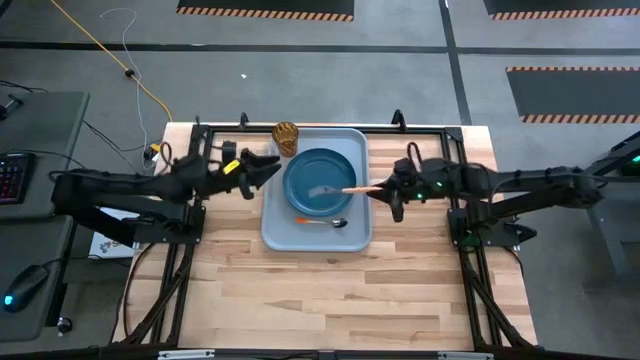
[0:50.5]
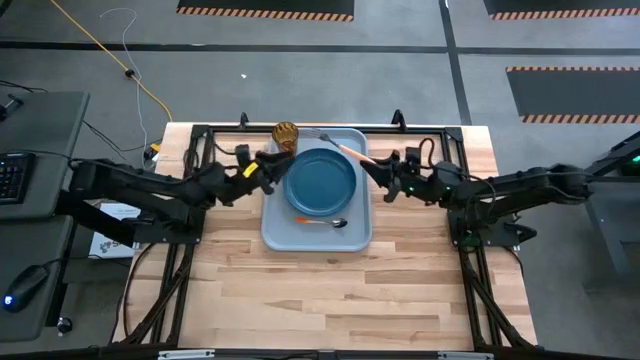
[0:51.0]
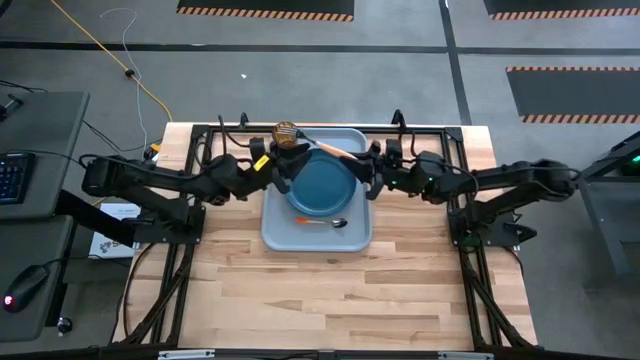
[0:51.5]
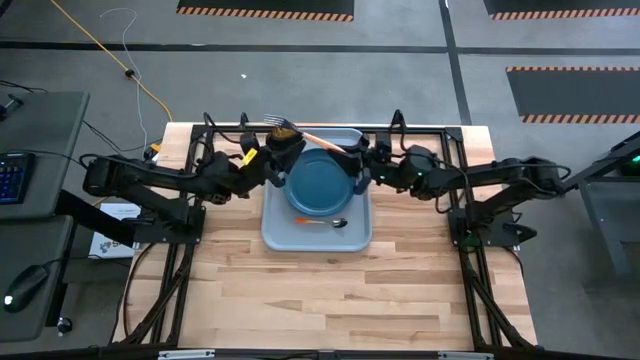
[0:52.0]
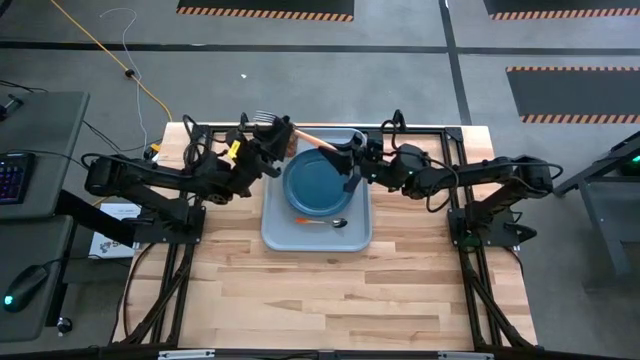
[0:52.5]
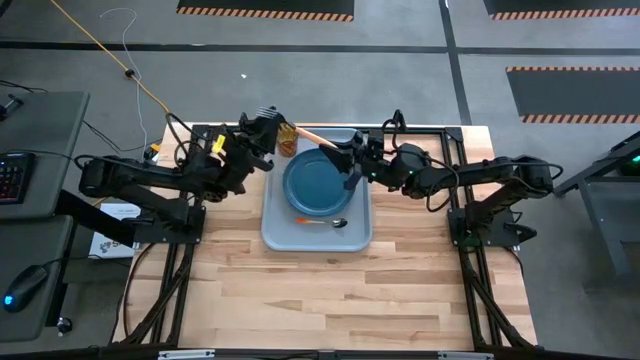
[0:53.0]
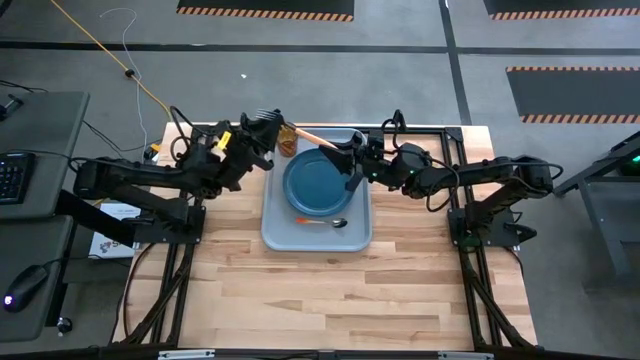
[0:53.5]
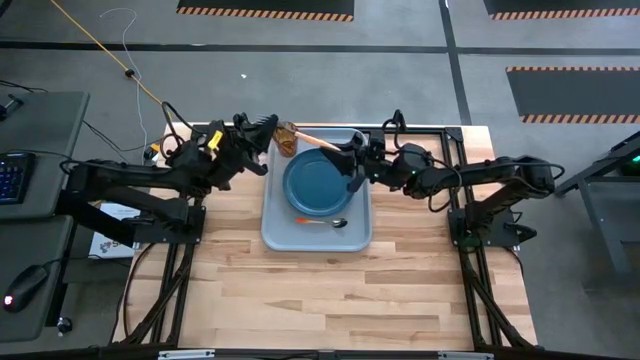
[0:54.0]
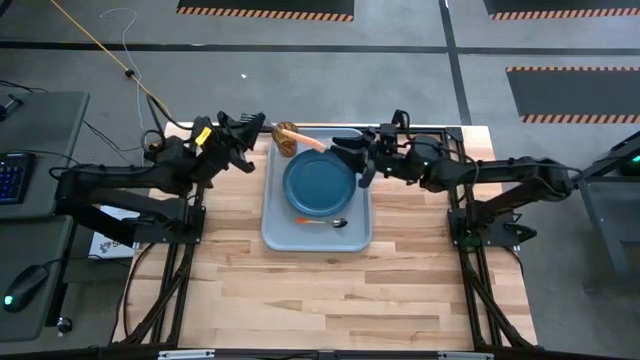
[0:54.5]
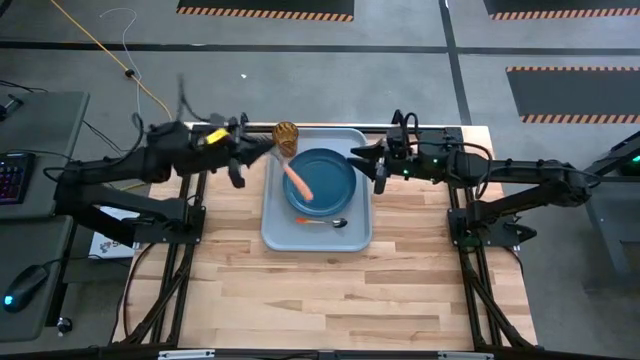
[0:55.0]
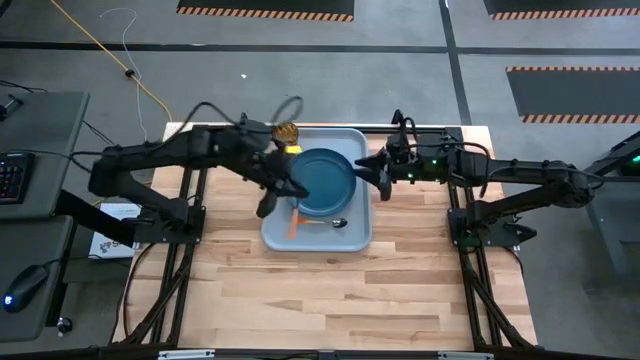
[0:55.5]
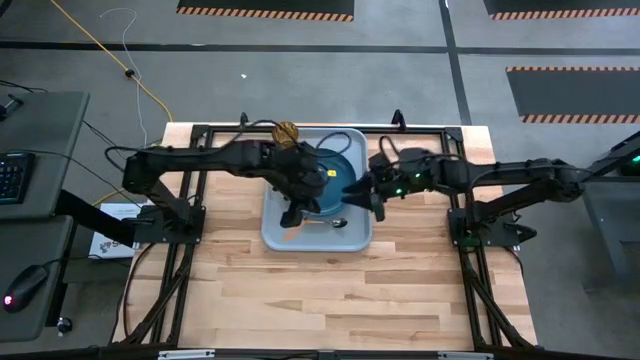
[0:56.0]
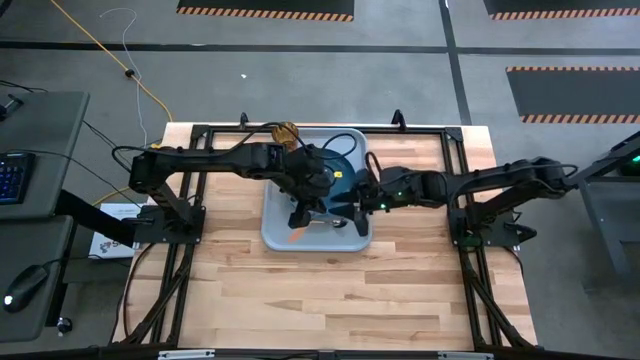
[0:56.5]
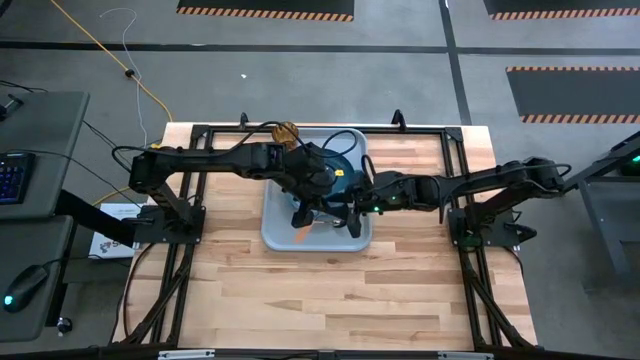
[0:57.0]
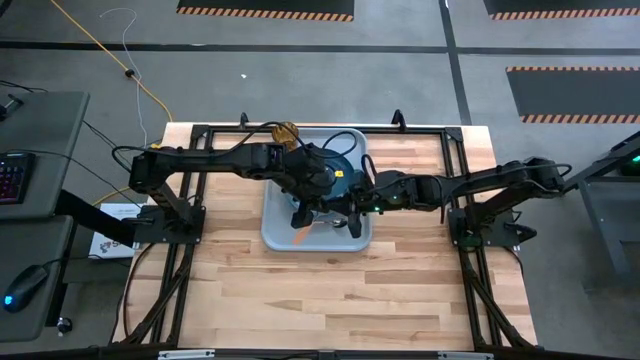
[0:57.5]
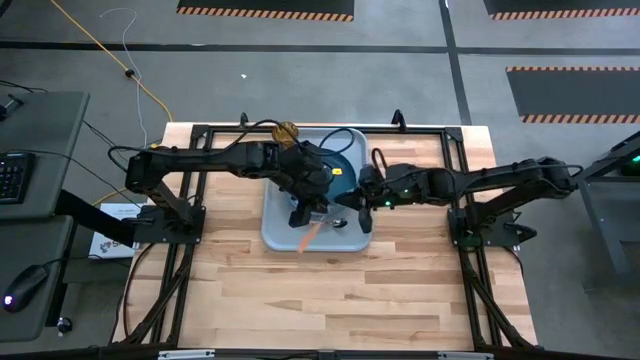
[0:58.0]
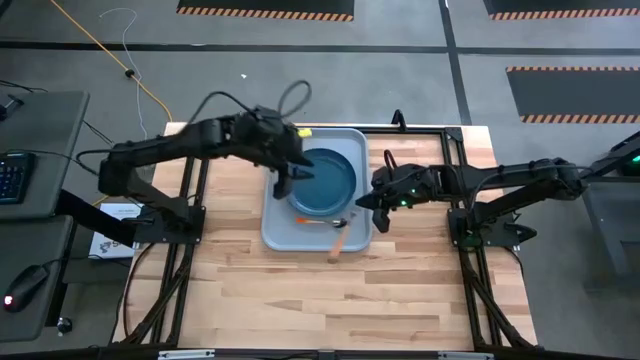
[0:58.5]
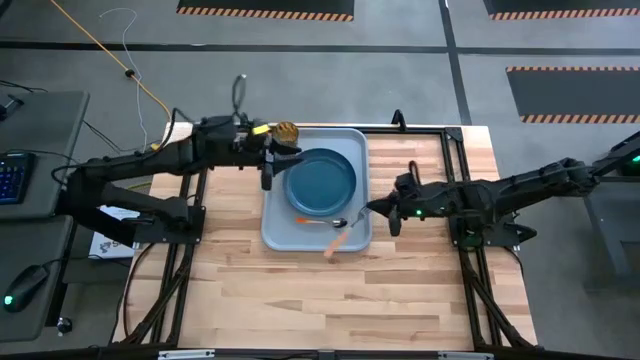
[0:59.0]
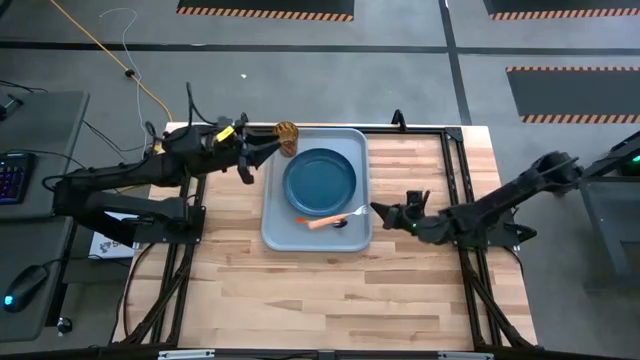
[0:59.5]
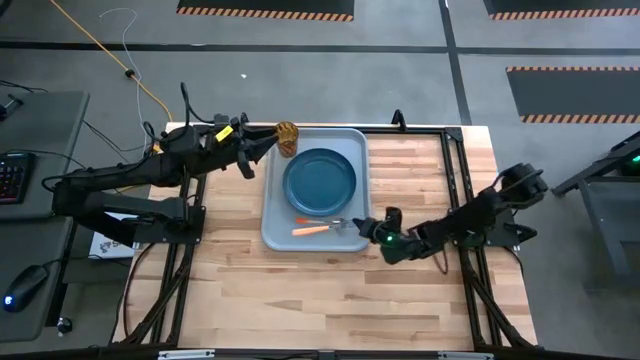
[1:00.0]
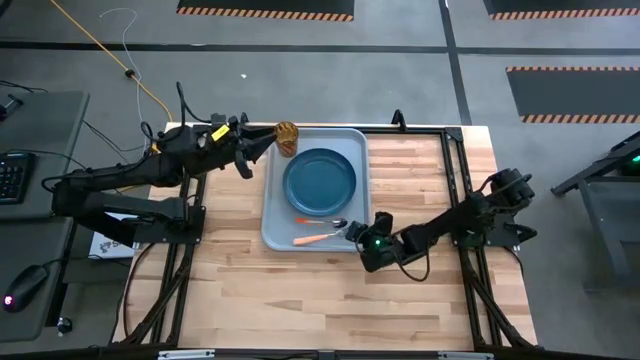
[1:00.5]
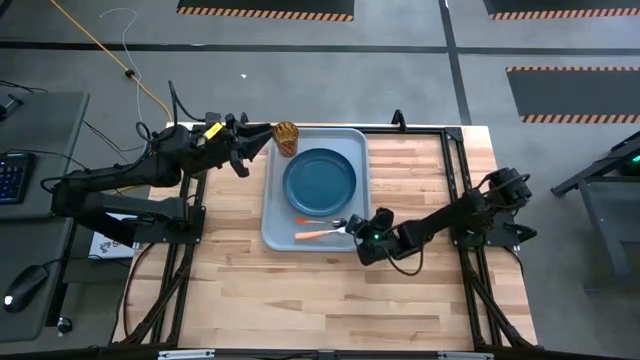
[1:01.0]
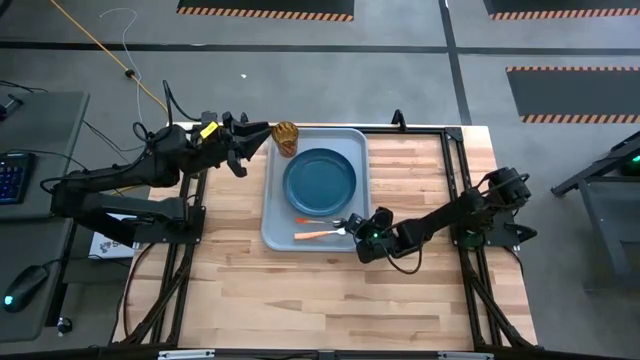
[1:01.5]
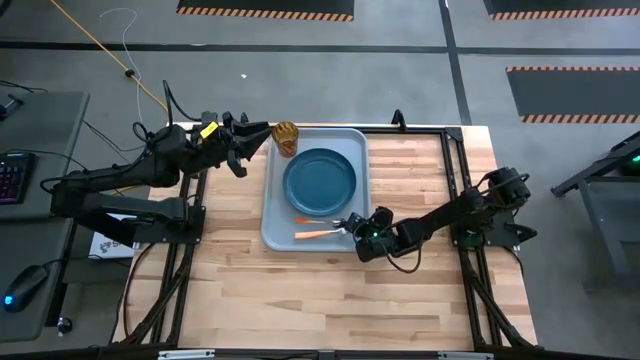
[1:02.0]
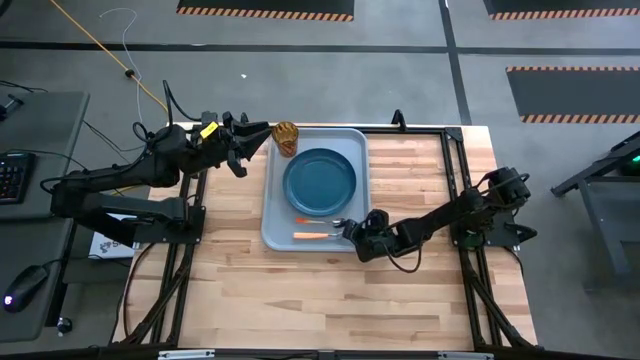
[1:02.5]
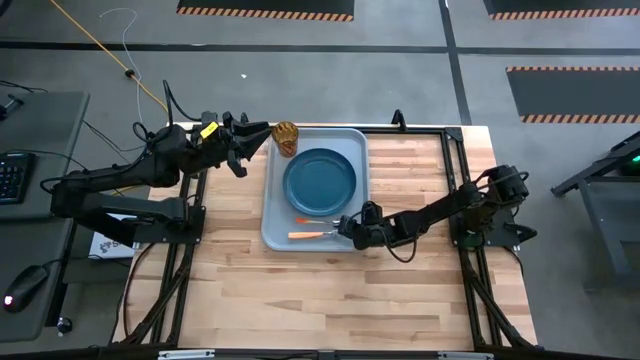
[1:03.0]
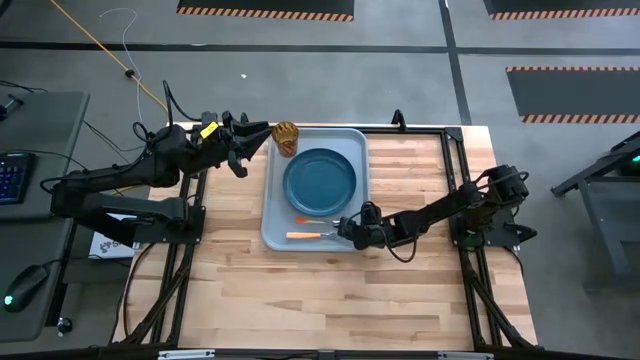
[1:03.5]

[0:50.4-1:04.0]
Task: Pick and place plate/cup/fork/spoon on tray
Put the orange fork on the bottom side of the light blue tray next to the orange spoon

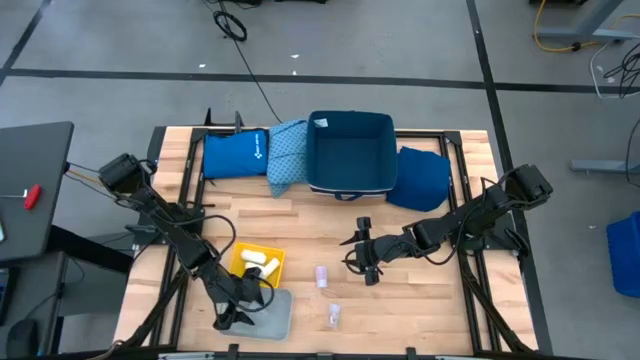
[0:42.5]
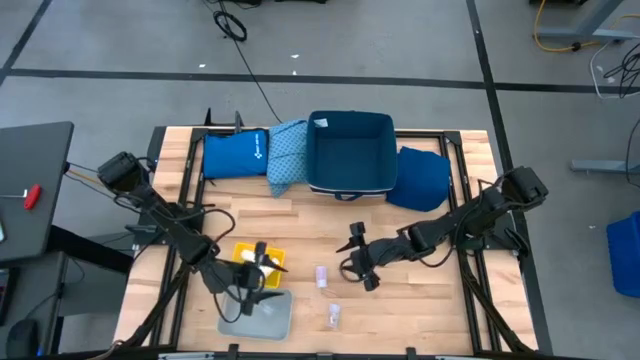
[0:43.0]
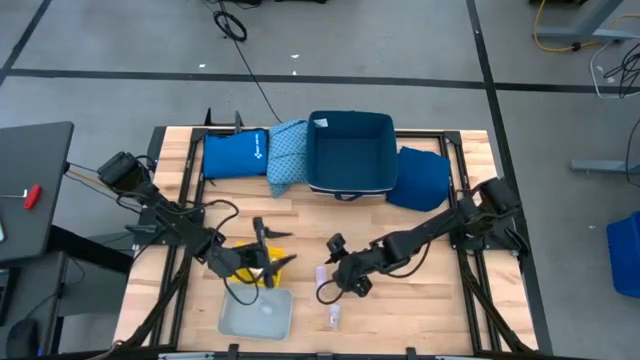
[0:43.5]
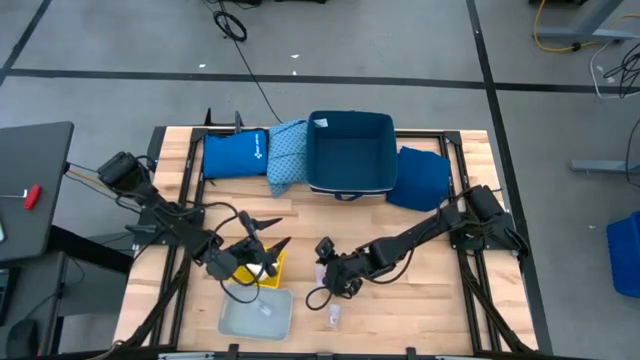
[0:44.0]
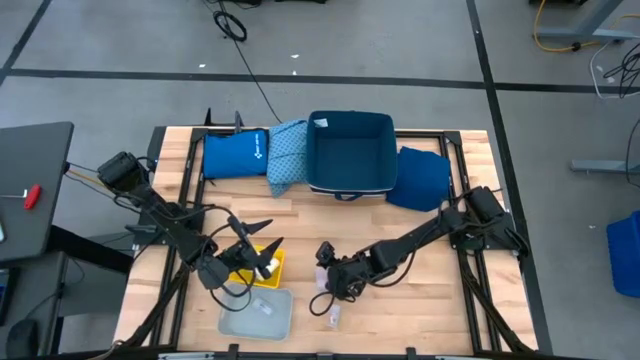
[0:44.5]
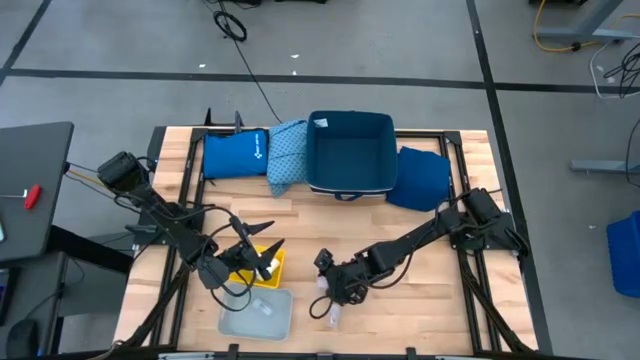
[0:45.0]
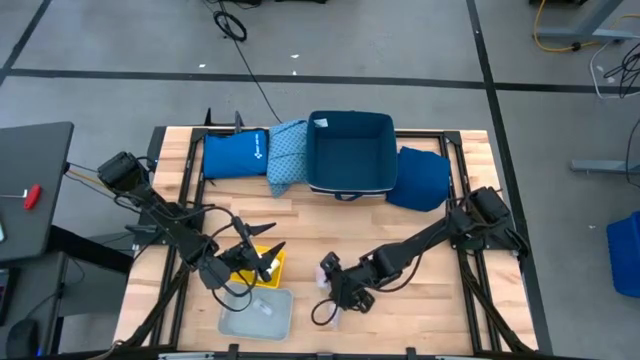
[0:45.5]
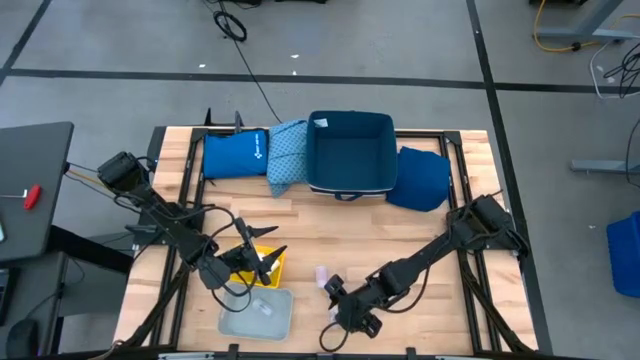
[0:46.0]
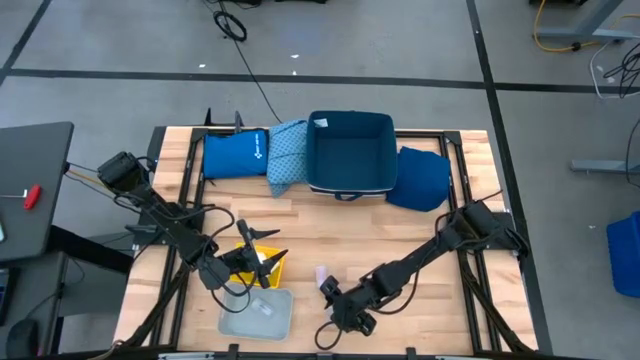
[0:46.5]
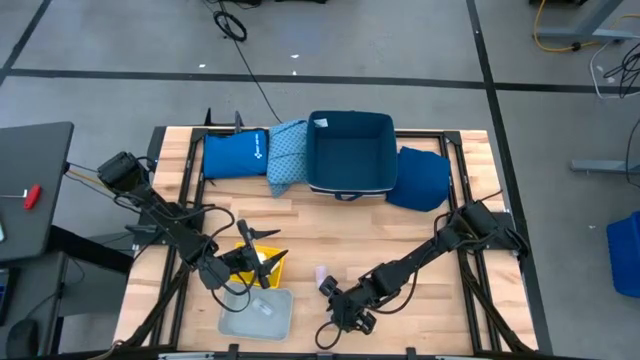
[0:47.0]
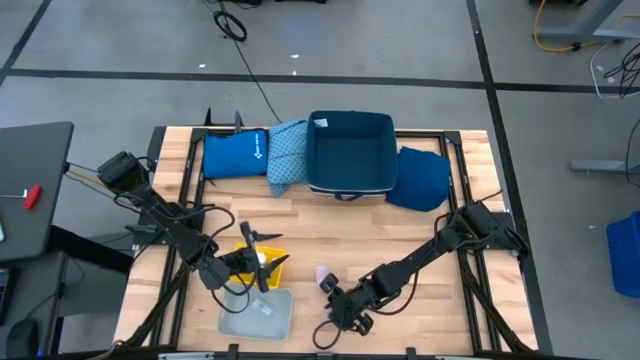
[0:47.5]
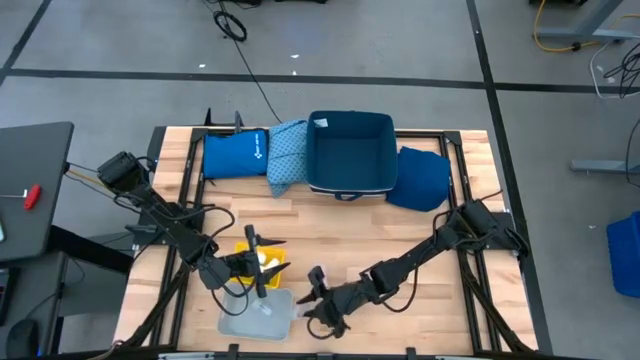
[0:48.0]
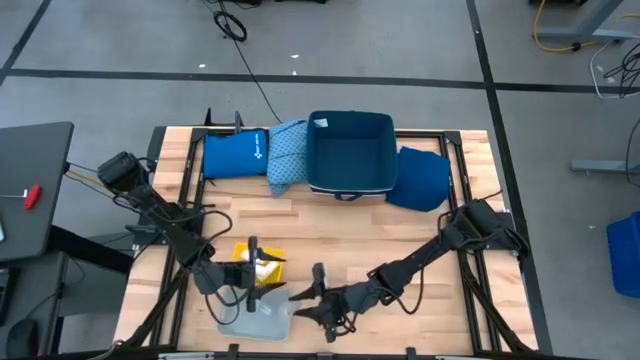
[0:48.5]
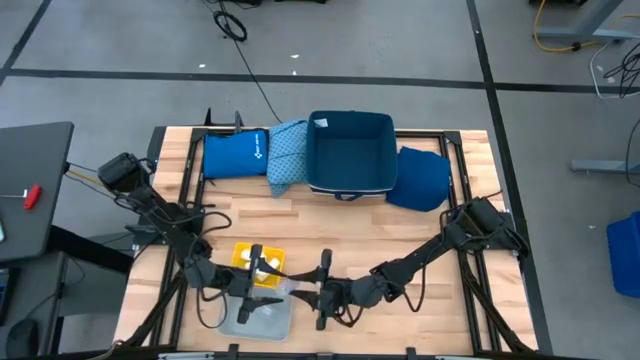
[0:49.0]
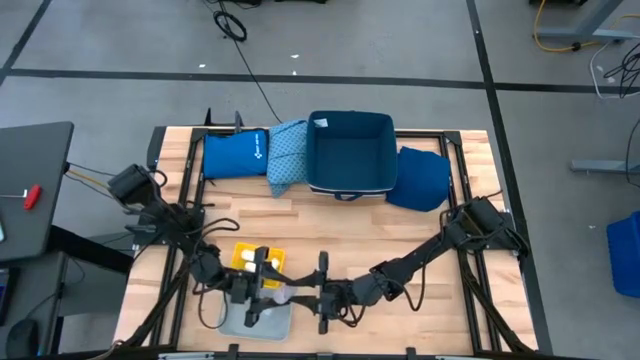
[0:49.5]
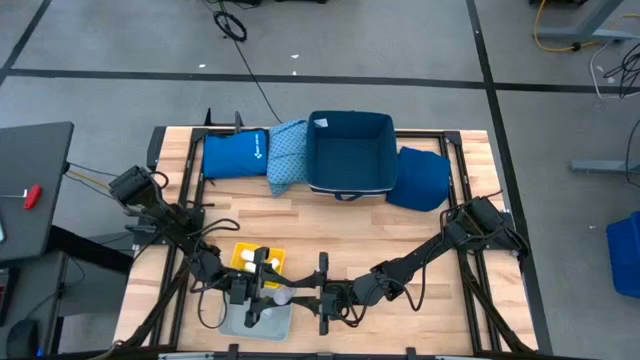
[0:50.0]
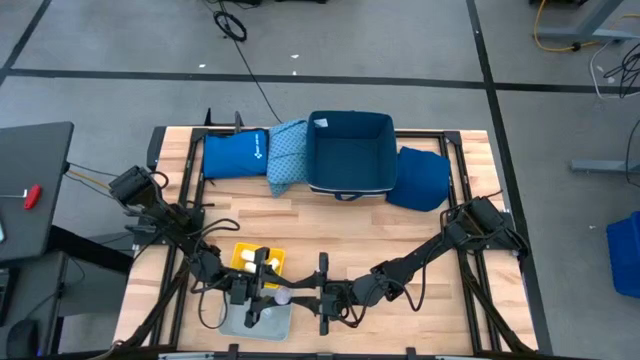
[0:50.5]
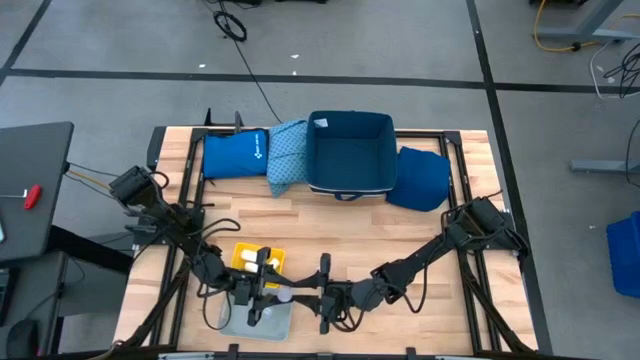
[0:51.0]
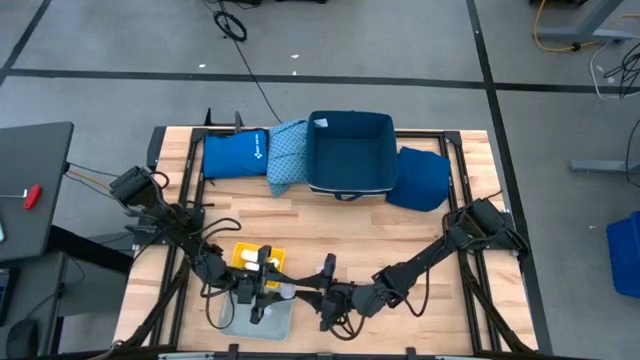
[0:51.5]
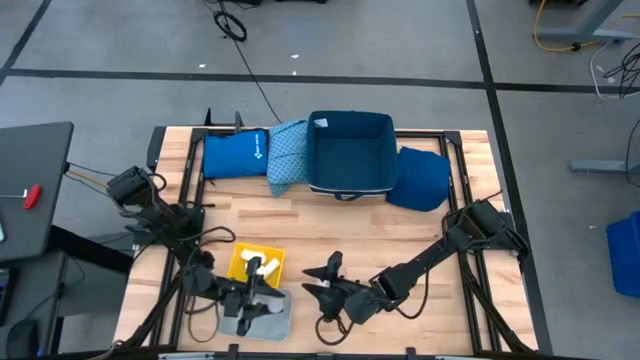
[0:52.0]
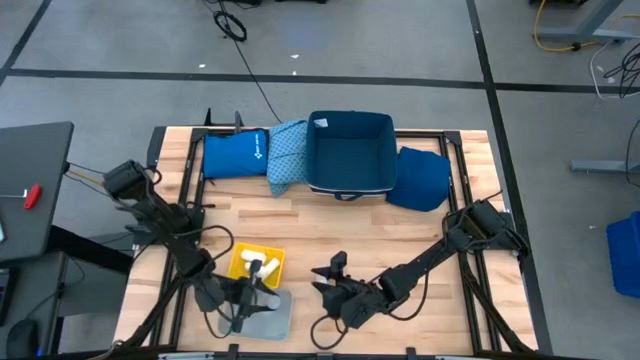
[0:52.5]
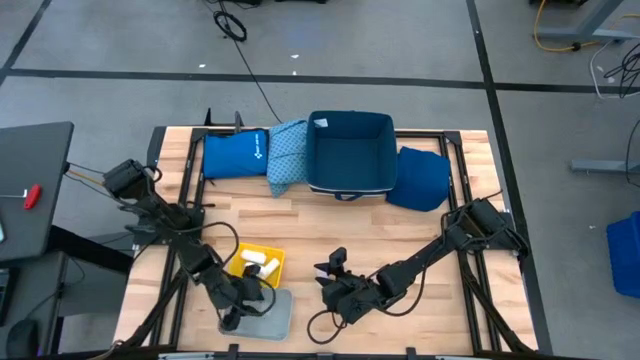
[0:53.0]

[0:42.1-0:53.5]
Task: Pick & place medical supplies in basket/bin
Put the bottom white pill bottle into the gray bin
